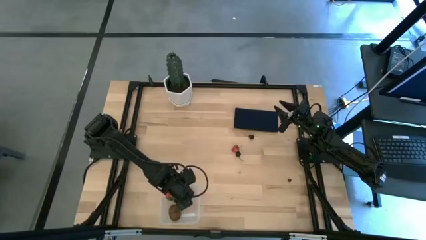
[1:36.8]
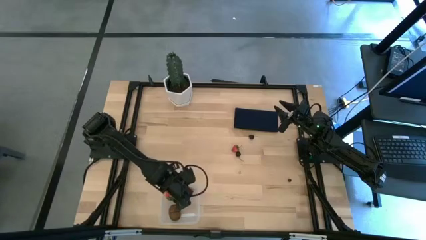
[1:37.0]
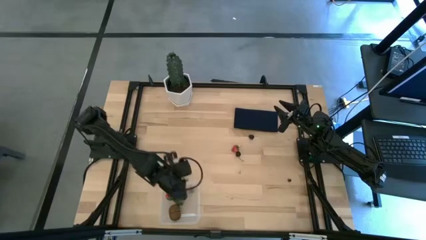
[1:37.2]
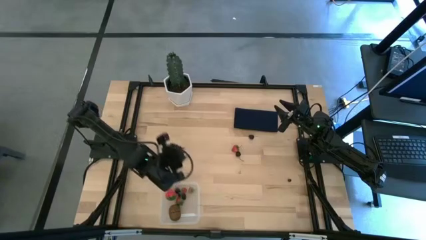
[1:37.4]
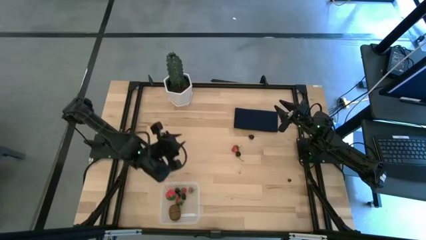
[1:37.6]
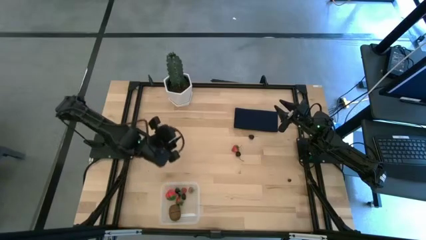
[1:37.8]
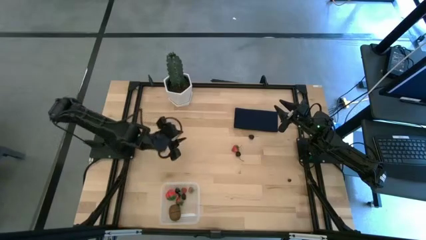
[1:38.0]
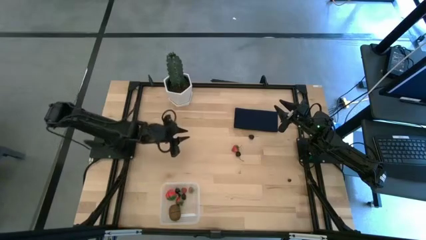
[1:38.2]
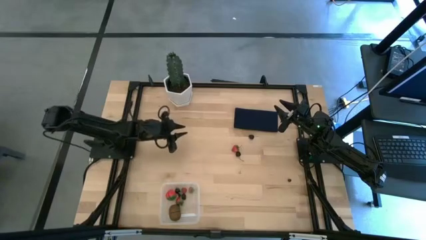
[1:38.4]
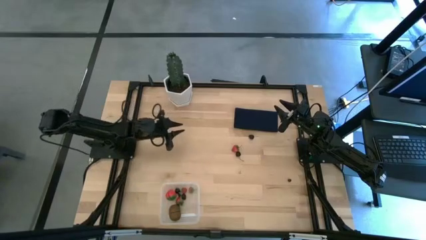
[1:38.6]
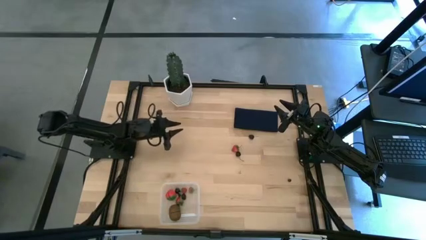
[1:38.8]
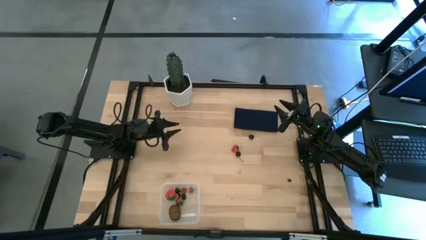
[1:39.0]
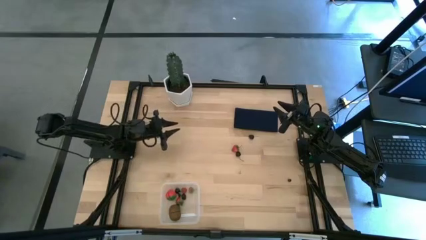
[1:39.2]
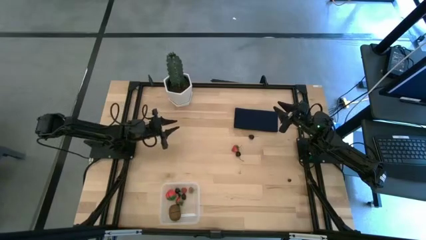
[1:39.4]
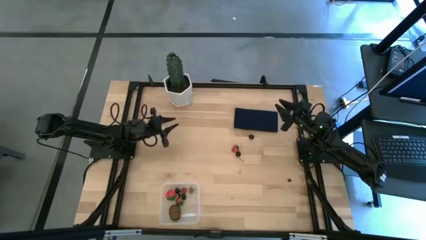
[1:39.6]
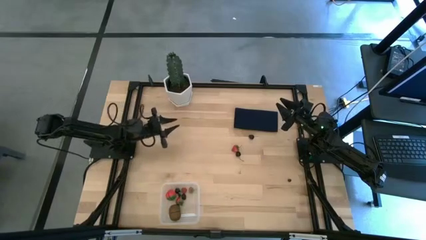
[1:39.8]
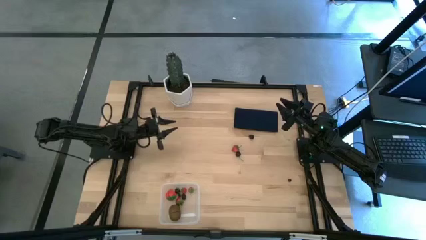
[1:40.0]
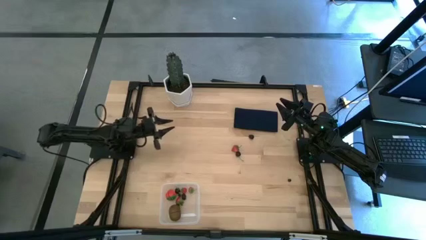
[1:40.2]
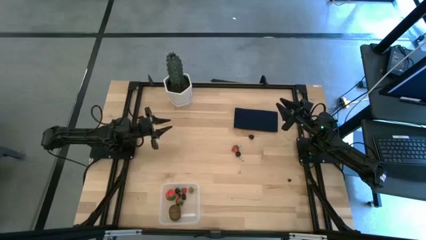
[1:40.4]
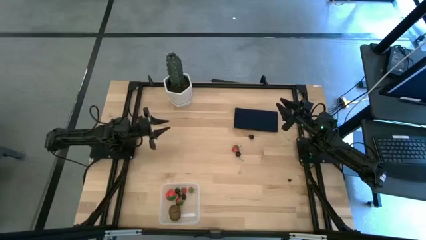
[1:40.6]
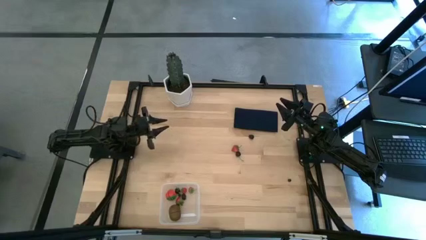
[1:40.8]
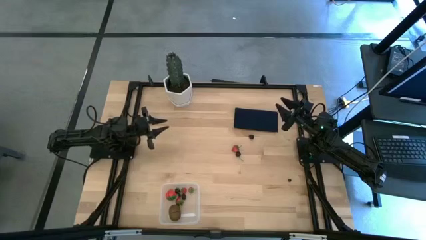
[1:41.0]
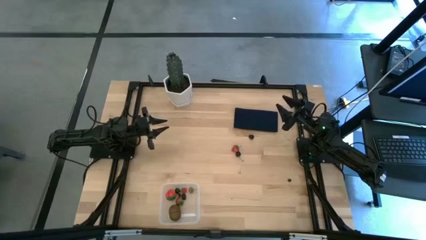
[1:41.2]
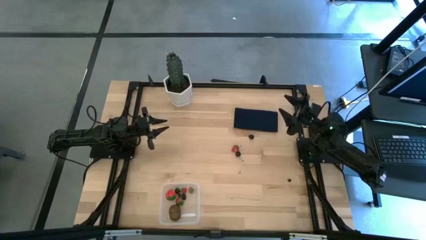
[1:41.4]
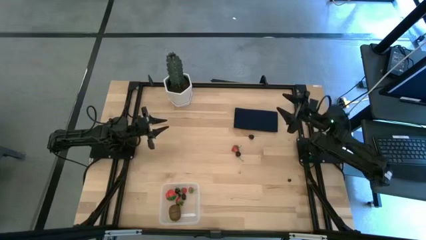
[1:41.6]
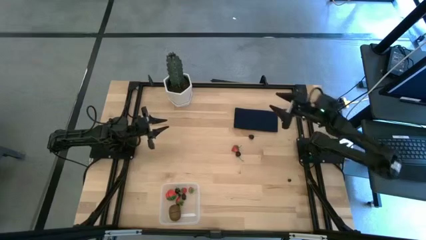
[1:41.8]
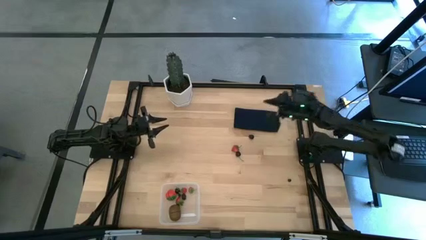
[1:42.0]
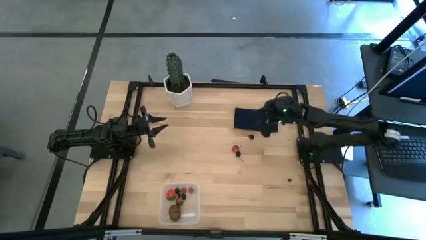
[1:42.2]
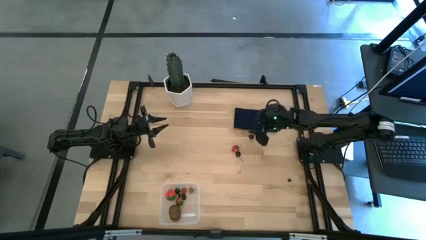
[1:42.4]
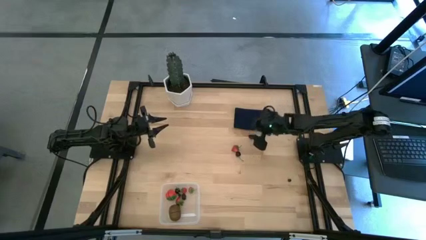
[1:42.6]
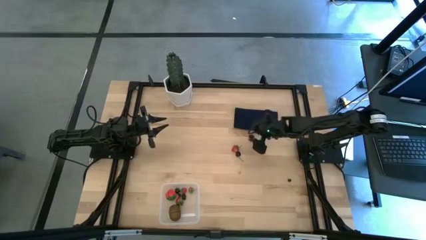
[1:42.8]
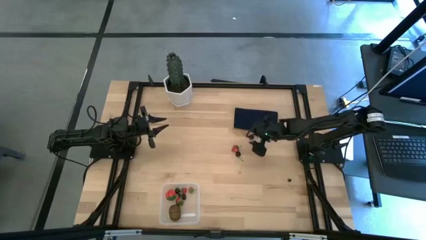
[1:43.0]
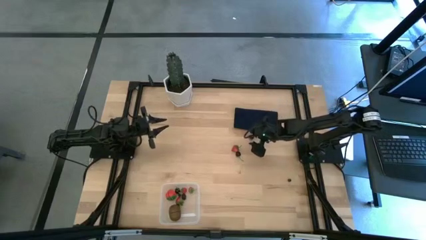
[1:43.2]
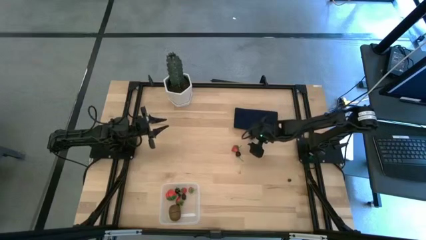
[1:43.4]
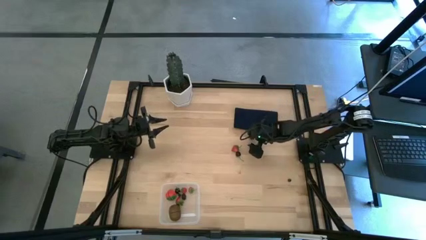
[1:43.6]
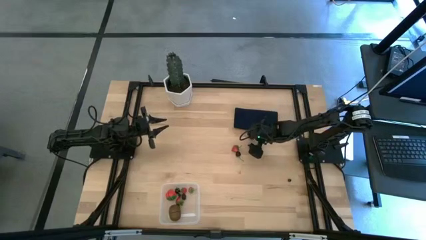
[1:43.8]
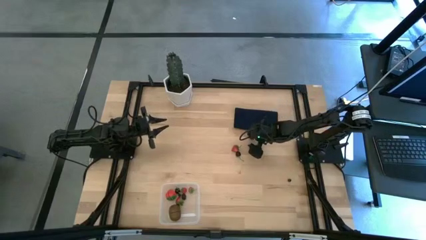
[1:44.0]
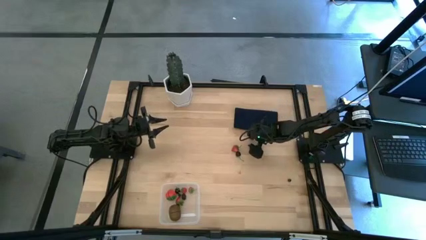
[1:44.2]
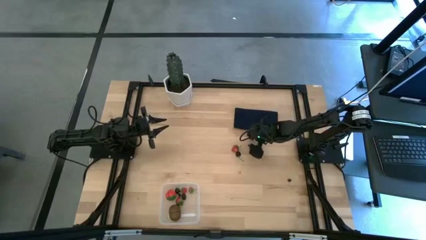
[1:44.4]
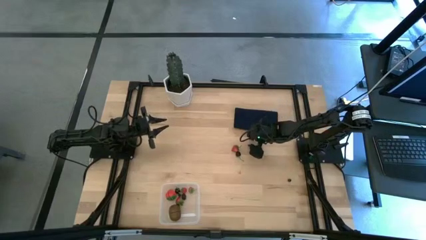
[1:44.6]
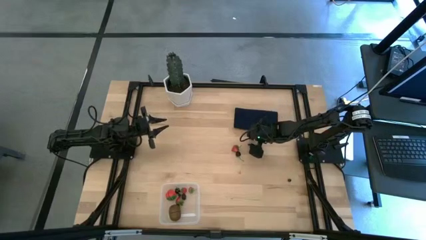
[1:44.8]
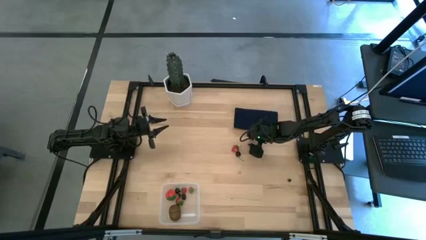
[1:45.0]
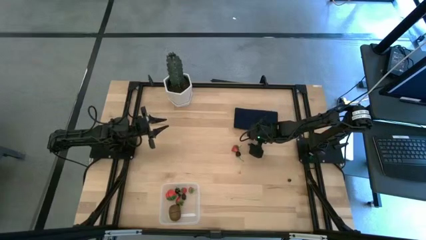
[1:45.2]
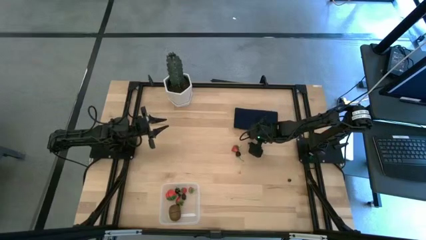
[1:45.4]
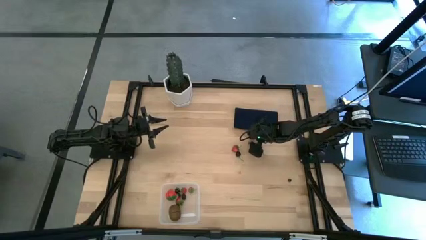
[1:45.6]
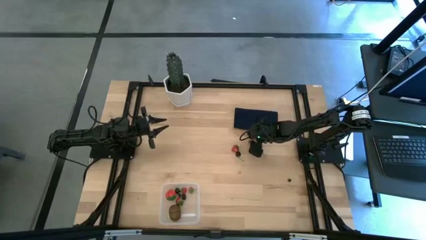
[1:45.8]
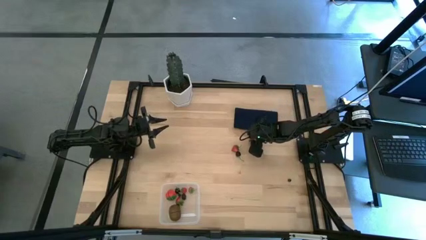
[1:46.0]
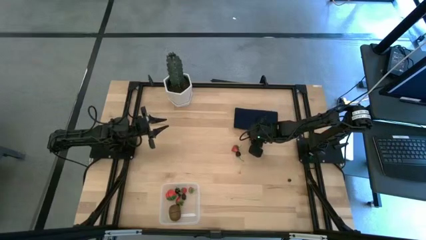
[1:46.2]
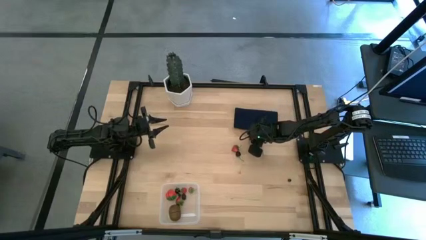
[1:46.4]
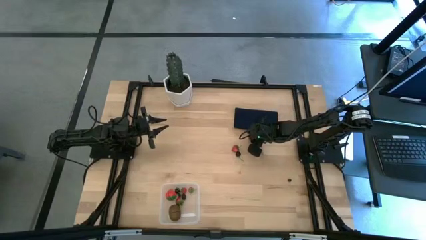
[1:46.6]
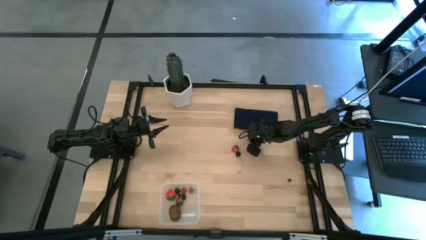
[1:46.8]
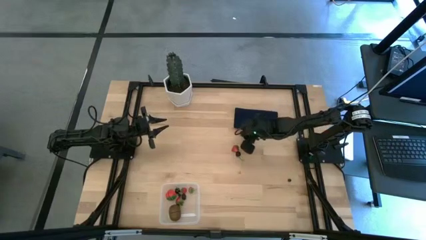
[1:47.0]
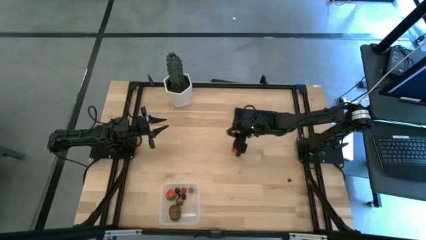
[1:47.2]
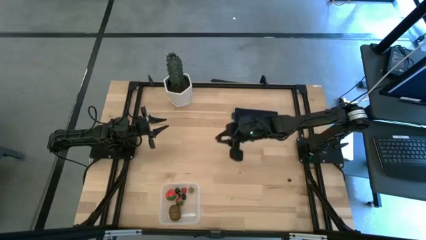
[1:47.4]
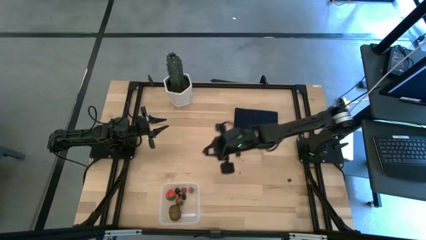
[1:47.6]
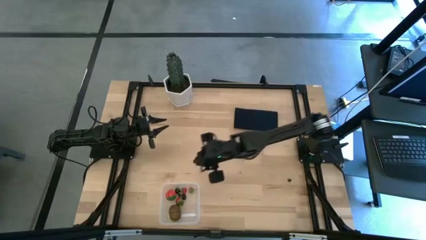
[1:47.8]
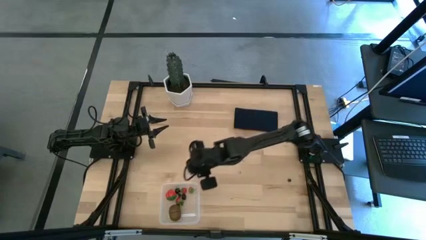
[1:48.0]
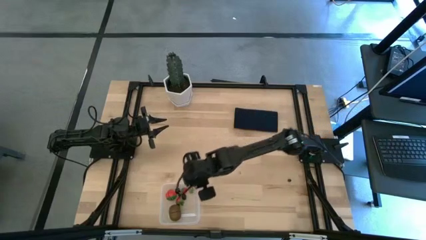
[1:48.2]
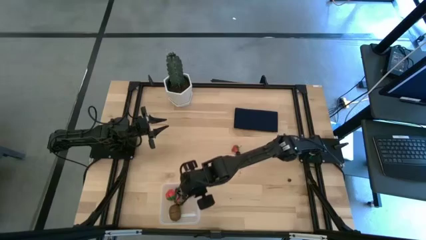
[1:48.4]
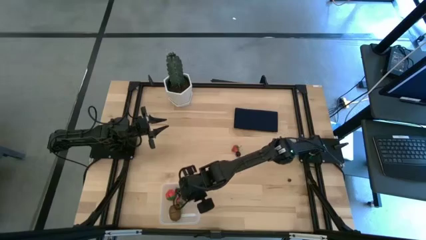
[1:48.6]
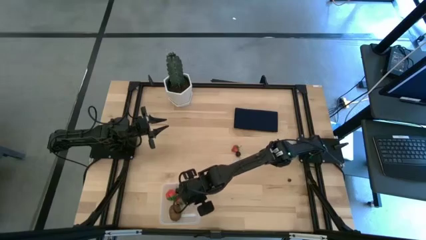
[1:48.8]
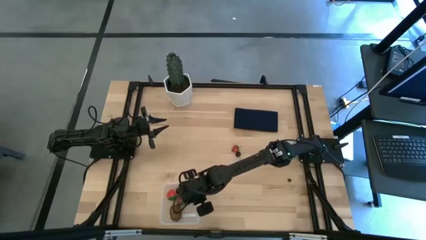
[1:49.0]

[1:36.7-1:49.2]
Task: Pick and placing Produce into tupperware
Put the blackberry in the transparent bin

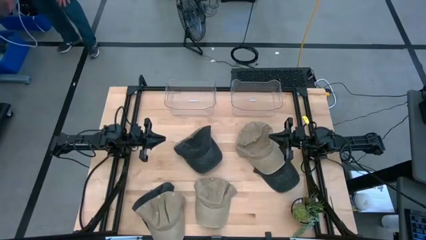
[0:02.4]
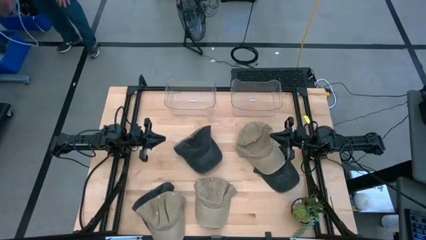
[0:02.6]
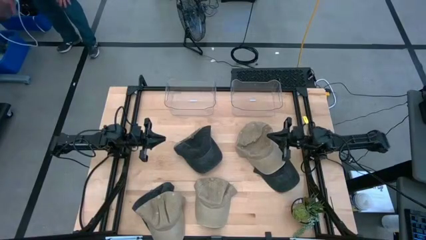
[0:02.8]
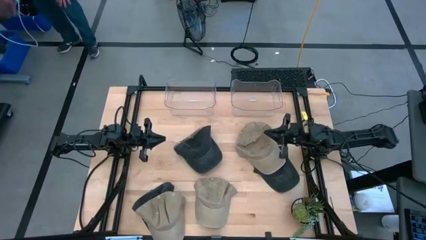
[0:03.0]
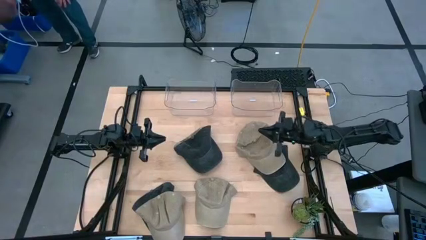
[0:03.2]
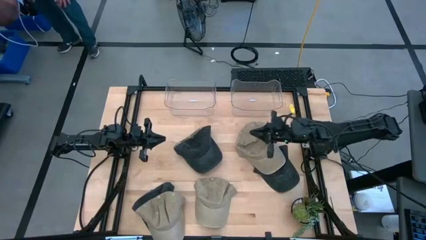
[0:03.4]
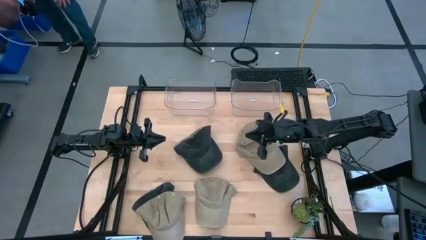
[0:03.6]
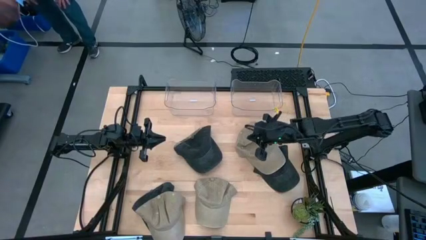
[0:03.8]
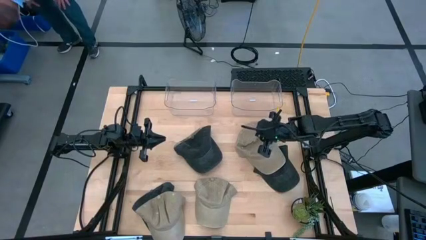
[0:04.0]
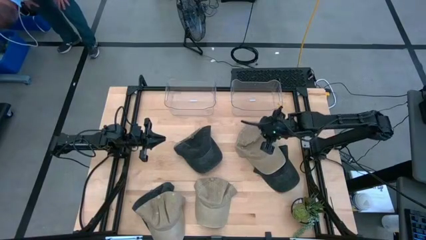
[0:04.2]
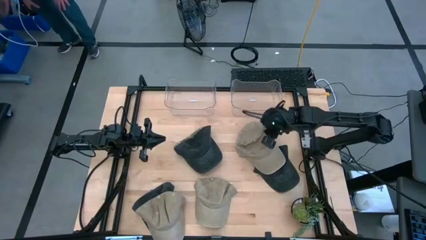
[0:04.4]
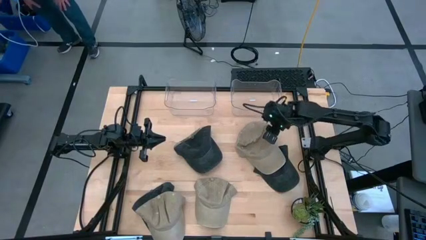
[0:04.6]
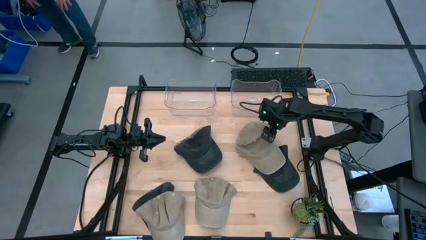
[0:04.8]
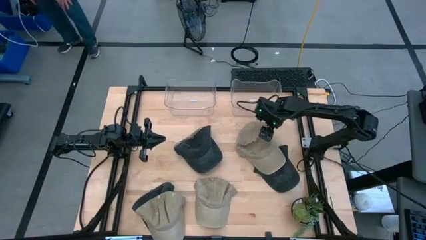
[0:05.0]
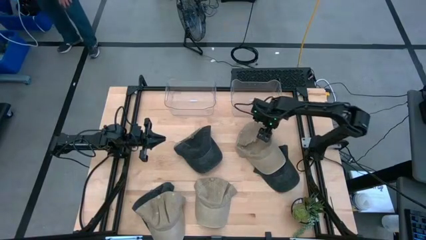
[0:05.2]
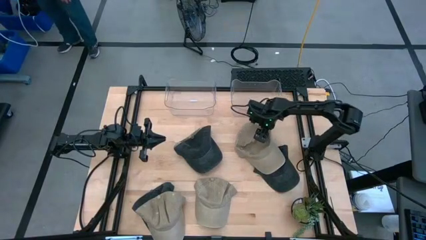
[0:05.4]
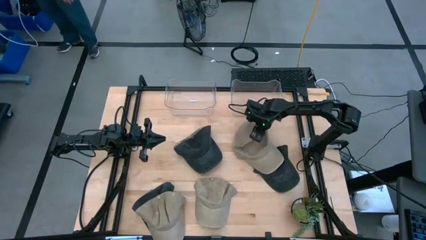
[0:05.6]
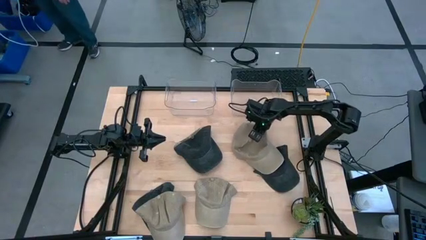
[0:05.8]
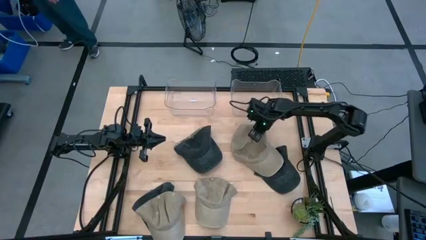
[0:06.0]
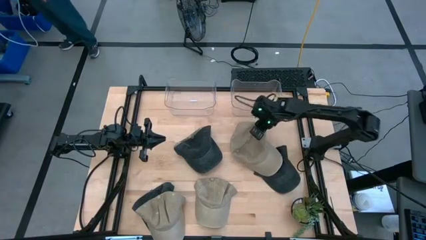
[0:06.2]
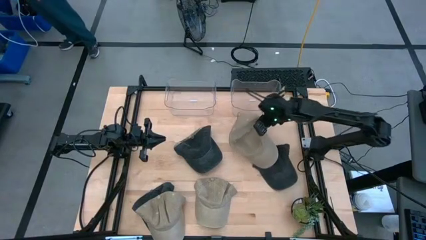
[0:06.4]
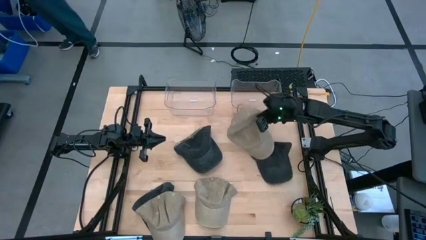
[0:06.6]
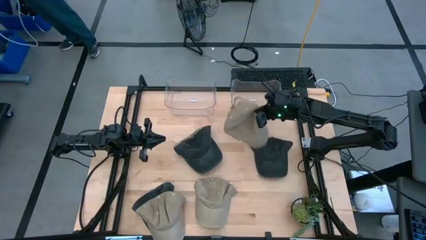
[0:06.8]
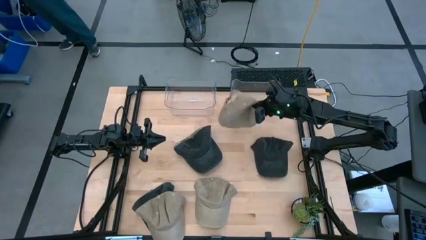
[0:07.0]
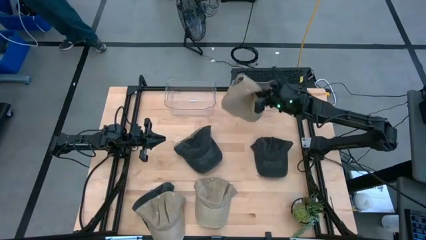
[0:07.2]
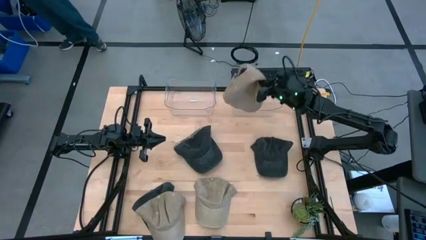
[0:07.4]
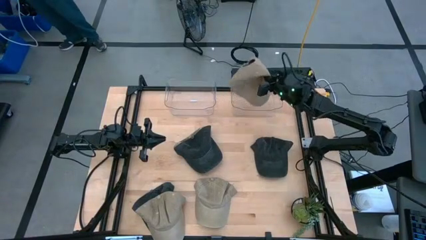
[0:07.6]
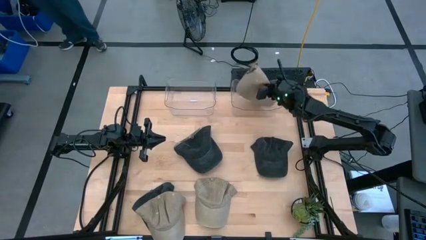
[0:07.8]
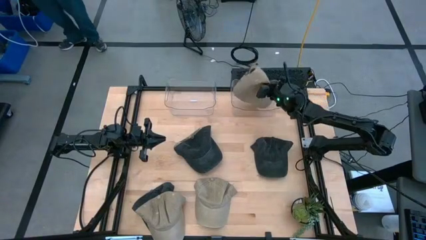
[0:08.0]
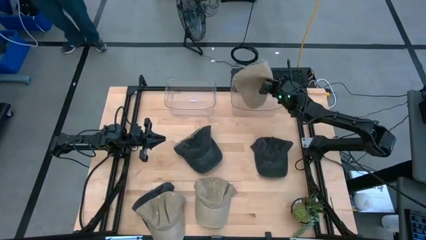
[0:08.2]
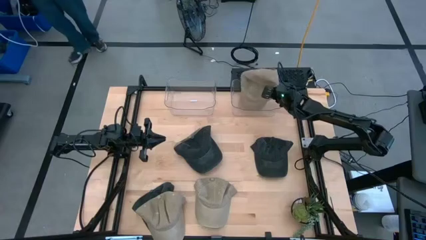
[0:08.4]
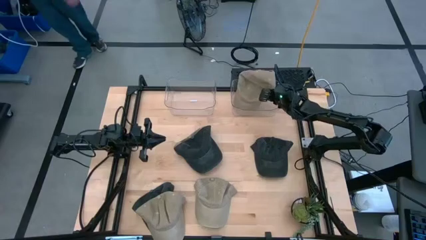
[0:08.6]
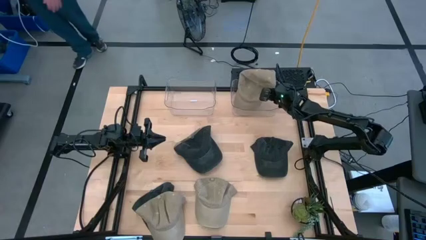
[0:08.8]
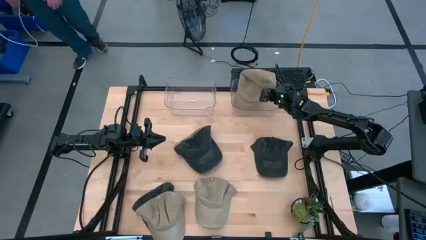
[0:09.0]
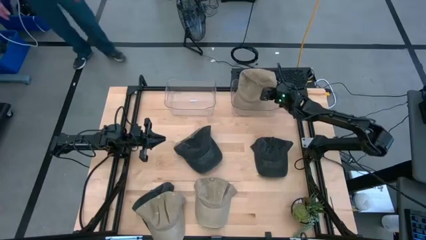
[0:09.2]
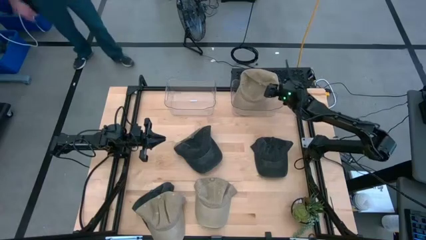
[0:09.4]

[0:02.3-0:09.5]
Task: Pick & Place hat
Put the brown cap into the right transparent bin
